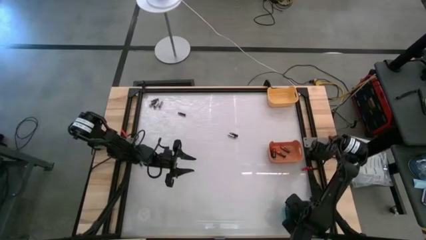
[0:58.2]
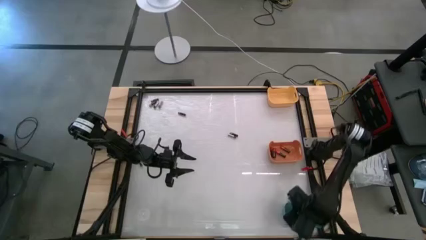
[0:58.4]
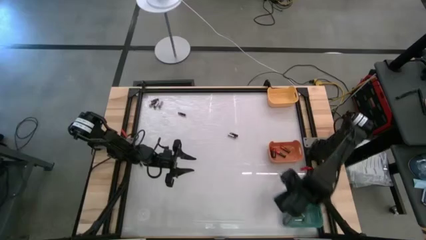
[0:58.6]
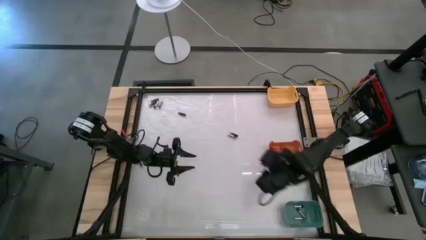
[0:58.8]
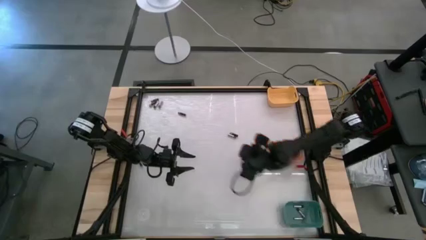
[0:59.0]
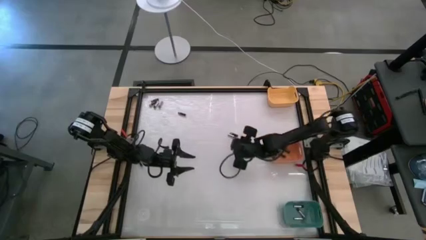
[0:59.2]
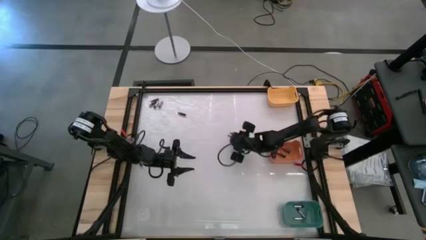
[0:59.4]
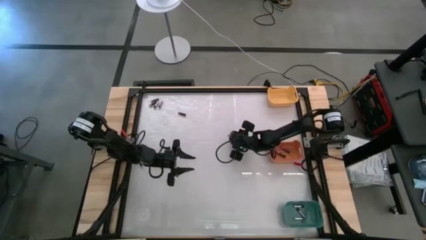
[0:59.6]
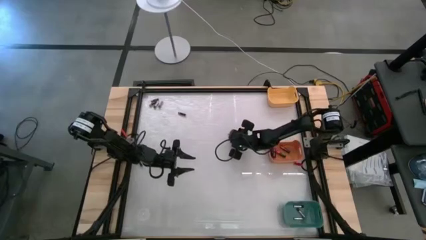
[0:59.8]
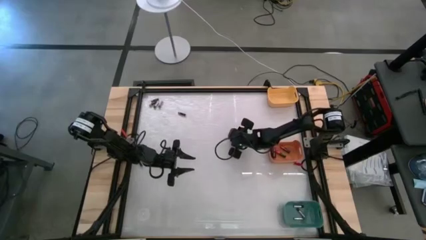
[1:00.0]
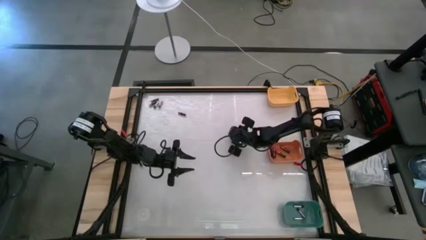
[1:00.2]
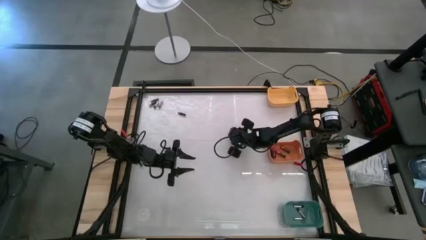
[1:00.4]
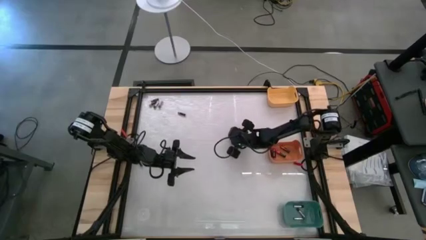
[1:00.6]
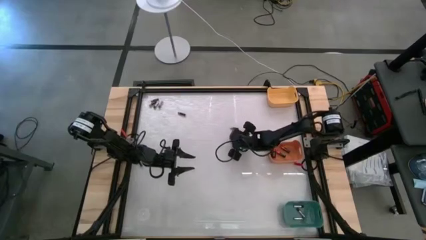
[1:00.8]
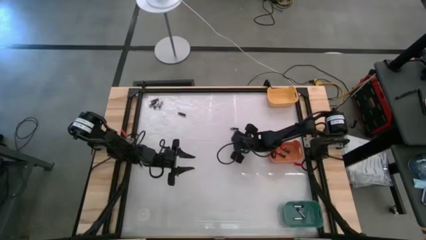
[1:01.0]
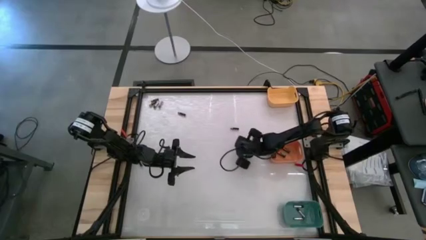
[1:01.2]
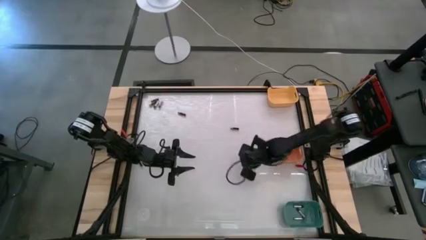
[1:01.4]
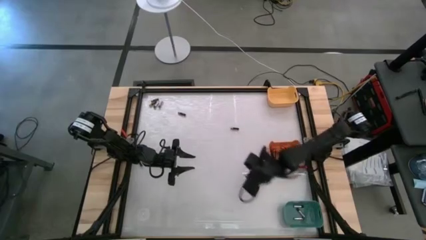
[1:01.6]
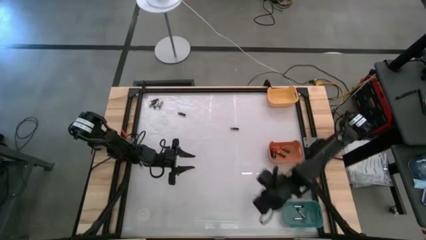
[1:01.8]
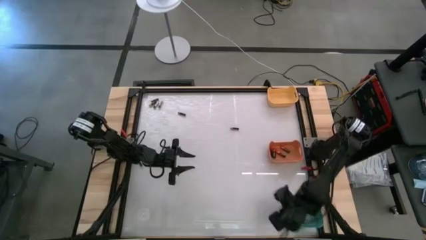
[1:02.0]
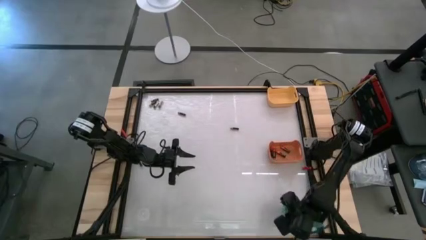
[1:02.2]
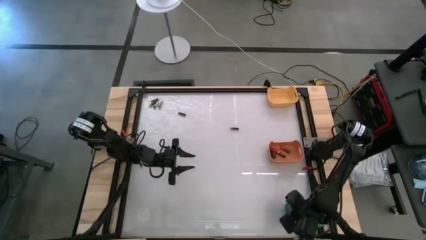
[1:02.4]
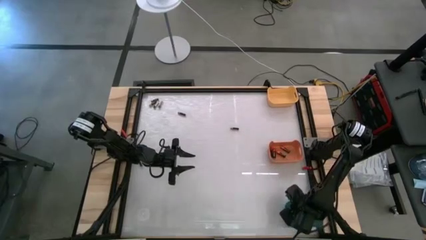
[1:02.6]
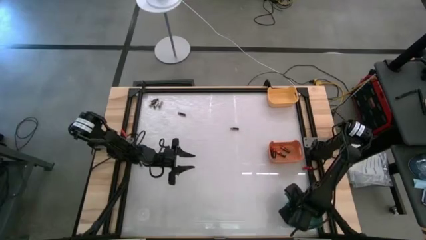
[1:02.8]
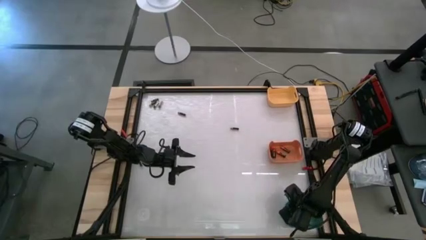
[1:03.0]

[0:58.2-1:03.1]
Task: Sort batteries
Put the silver battery into the green bin

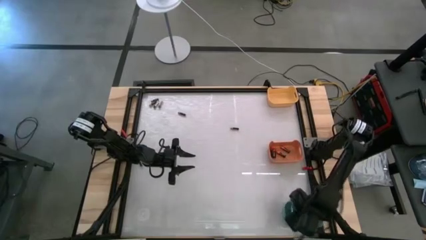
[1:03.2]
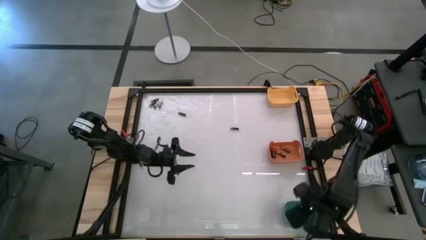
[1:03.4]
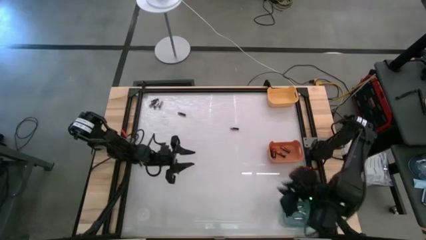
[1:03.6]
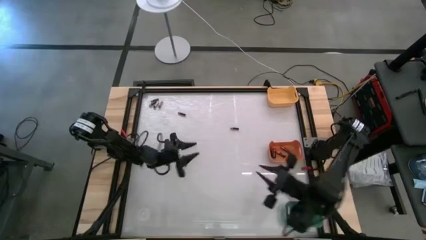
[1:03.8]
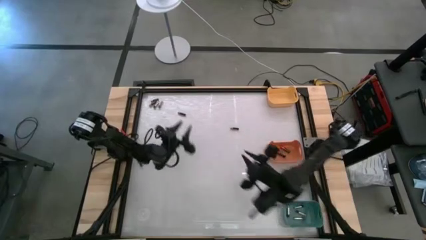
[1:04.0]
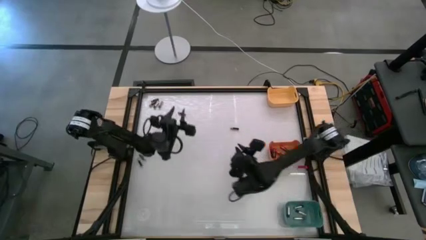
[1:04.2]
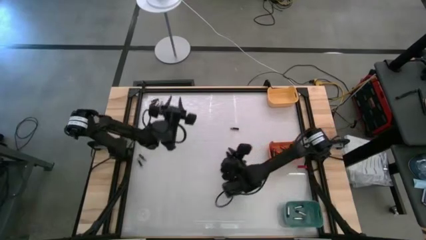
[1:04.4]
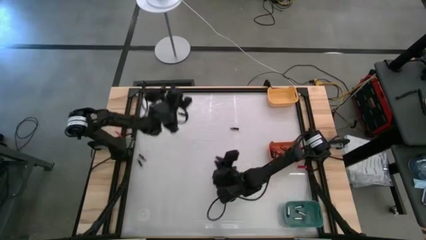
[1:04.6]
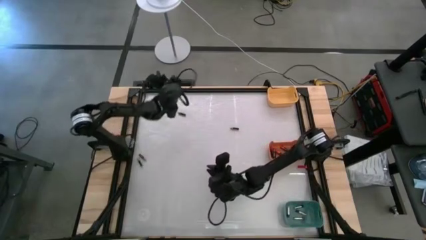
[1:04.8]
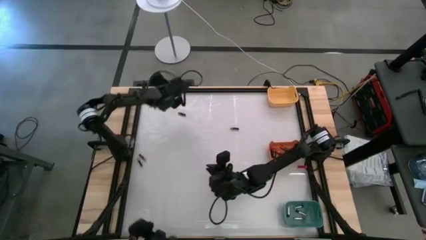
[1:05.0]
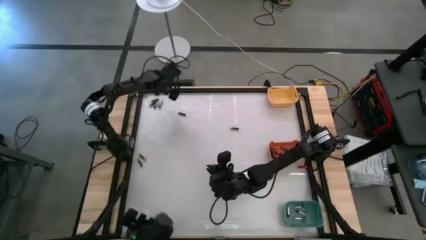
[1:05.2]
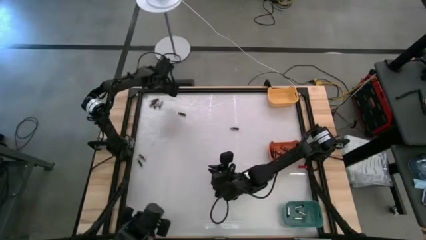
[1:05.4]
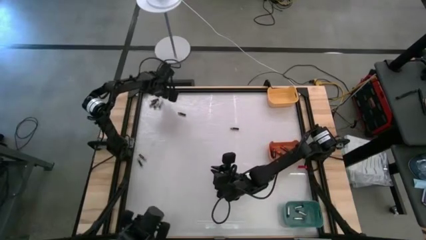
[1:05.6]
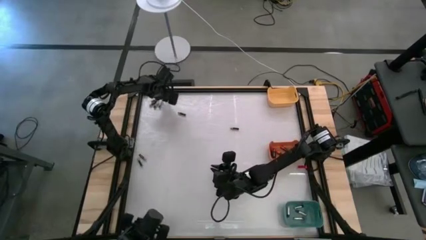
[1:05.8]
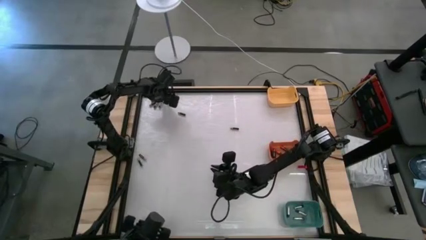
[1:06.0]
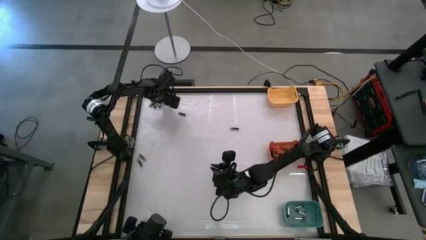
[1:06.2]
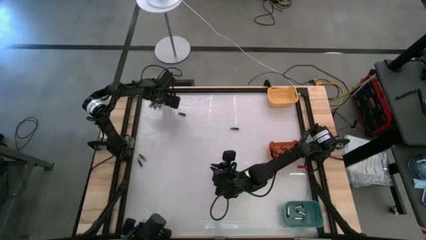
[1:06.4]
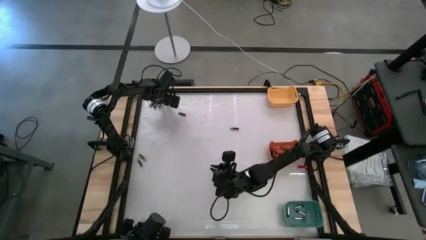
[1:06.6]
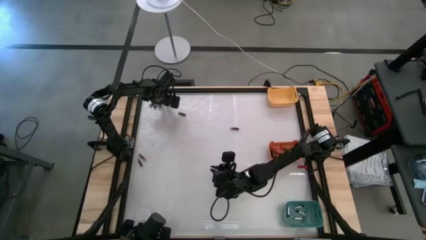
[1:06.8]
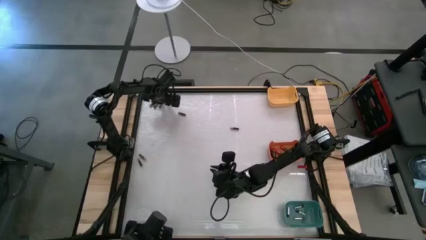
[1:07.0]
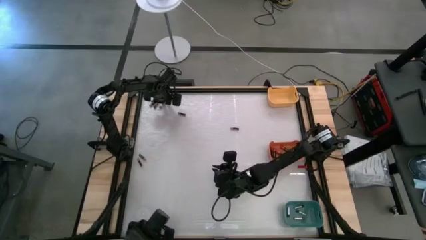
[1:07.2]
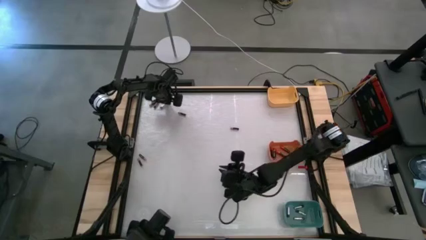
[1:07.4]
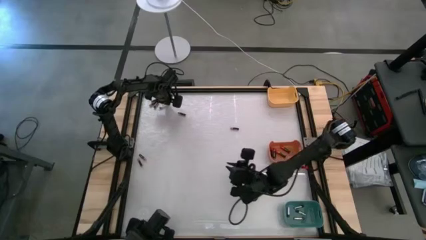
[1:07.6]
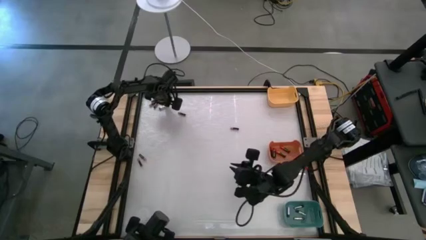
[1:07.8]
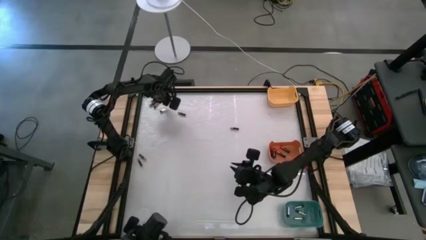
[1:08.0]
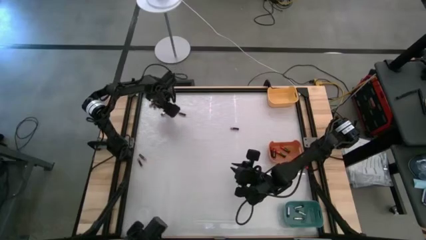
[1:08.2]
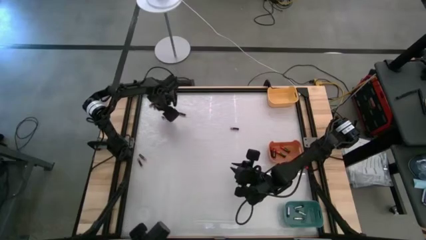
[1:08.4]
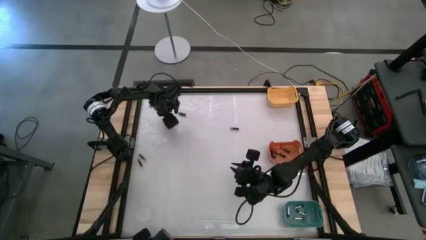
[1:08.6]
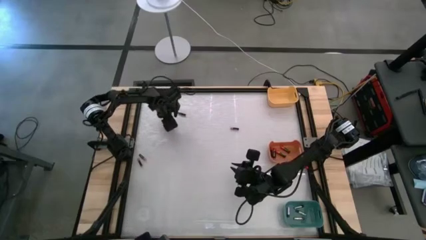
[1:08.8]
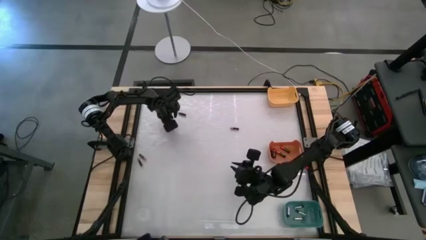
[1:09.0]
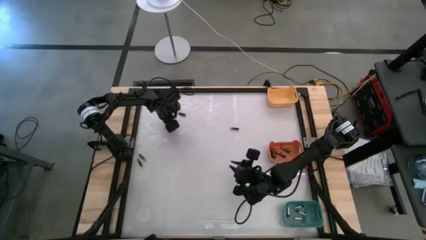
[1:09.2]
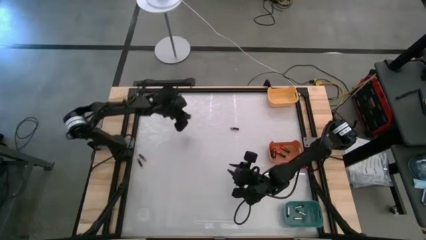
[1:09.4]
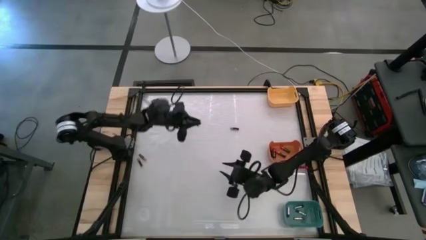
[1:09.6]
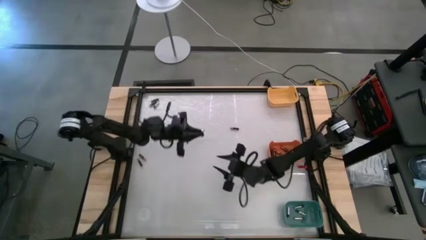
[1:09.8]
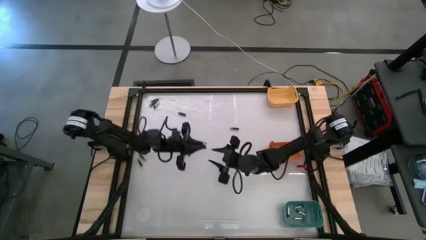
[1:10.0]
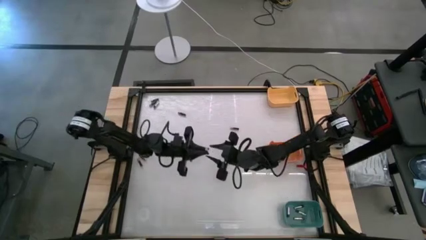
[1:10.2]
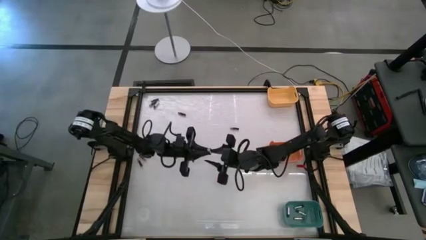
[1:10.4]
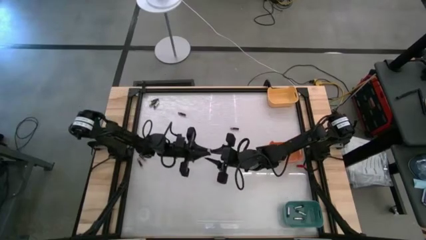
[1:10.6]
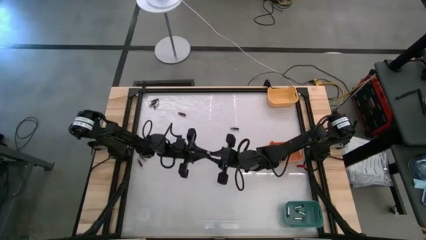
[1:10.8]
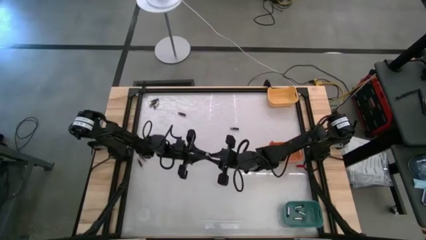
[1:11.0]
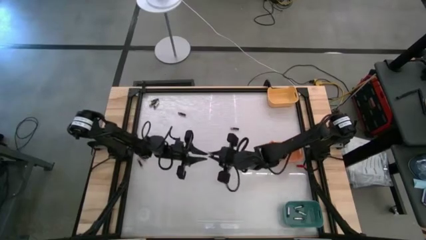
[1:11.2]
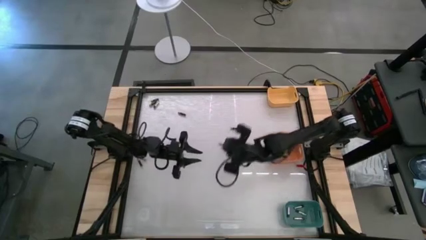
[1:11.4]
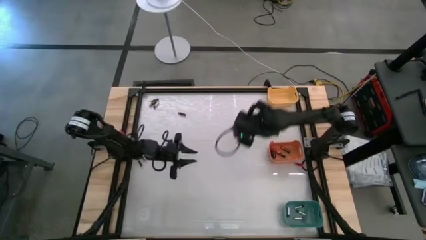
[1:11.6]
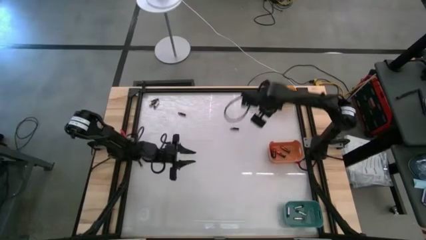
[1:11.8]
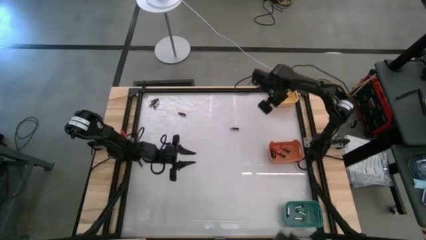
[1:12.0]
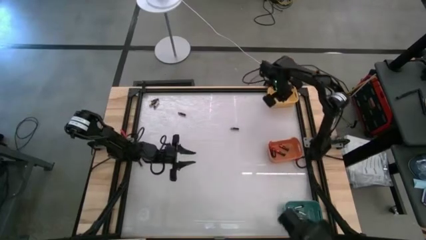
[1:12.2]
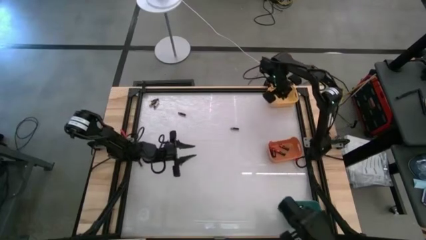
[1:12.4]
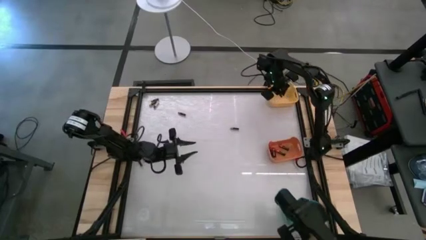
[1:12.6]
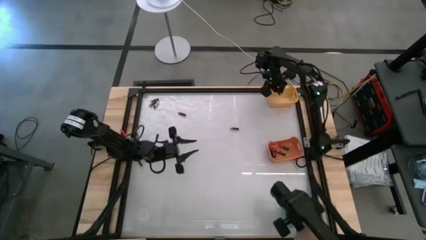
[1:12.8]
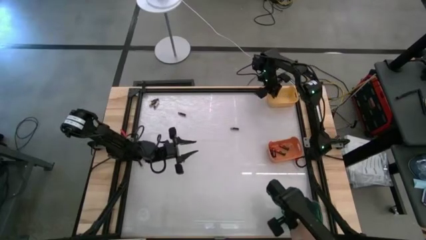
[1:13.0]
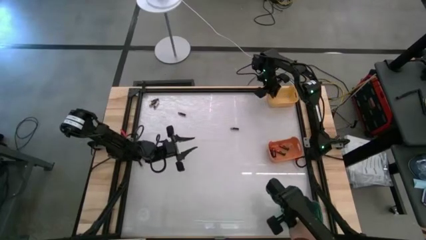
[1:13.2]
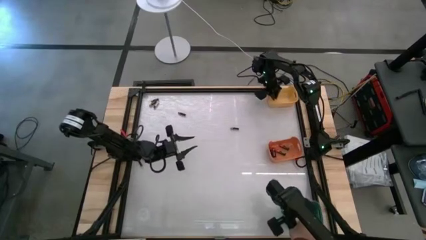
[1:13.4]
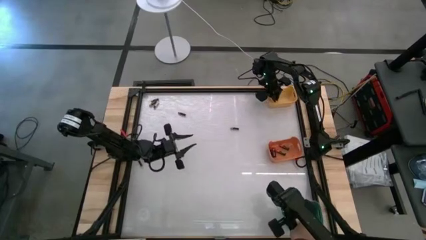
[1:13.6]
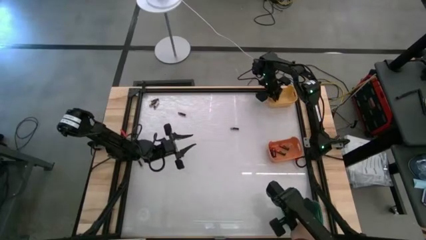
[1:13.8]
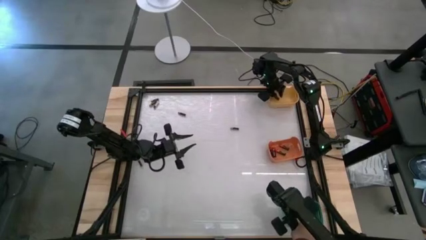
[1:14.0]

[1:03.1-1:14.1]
Put the silver battery into the green bin
